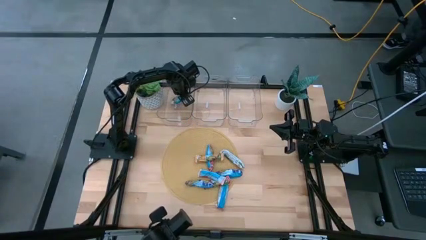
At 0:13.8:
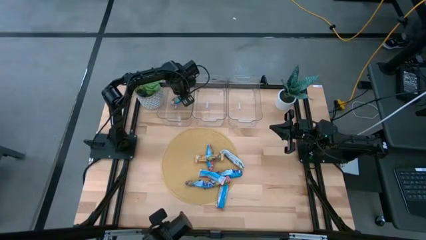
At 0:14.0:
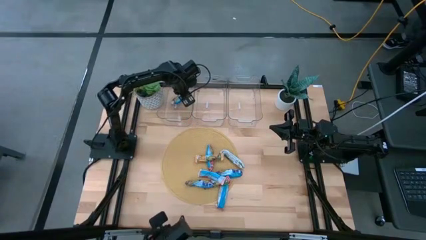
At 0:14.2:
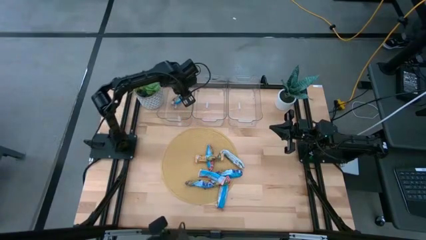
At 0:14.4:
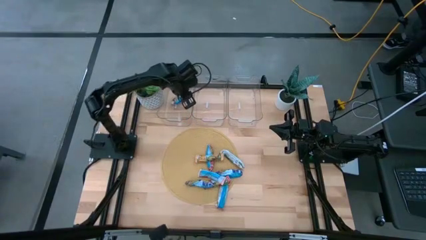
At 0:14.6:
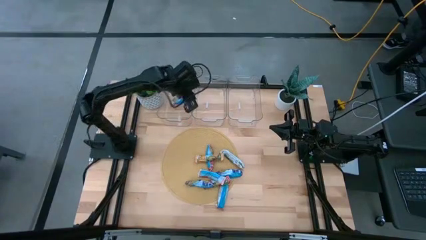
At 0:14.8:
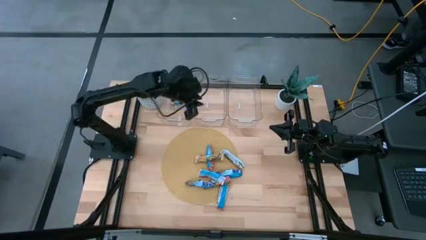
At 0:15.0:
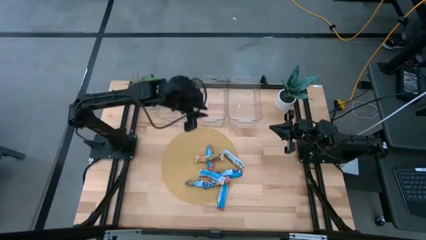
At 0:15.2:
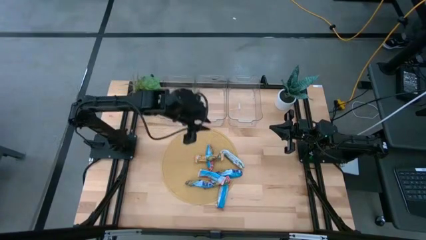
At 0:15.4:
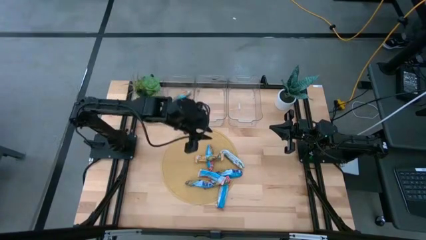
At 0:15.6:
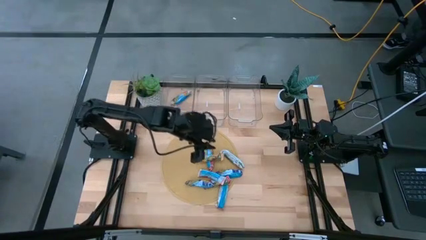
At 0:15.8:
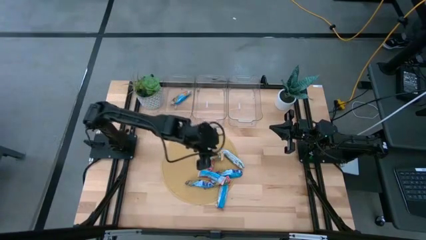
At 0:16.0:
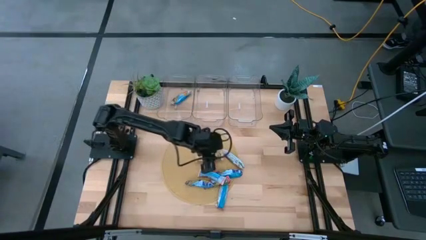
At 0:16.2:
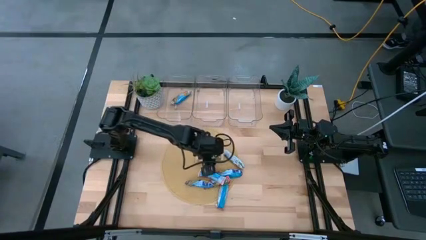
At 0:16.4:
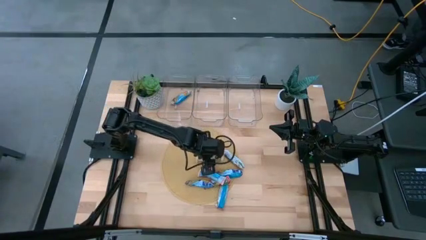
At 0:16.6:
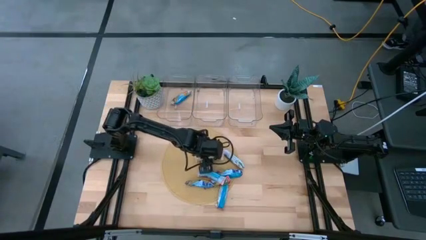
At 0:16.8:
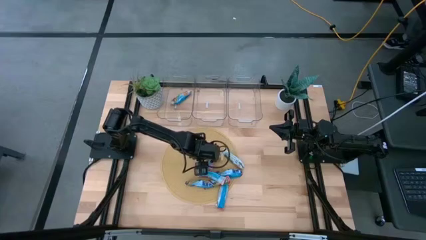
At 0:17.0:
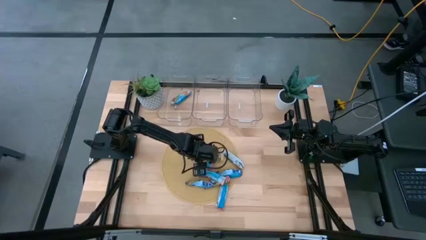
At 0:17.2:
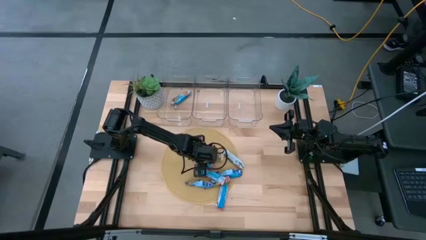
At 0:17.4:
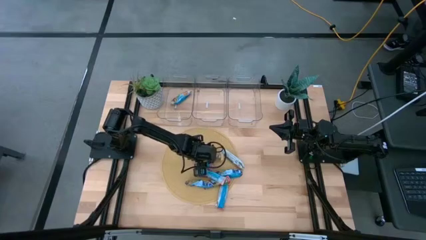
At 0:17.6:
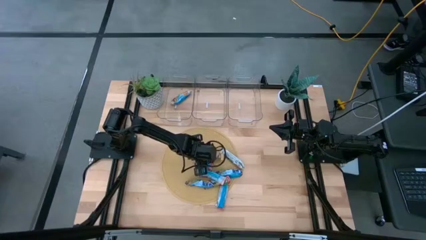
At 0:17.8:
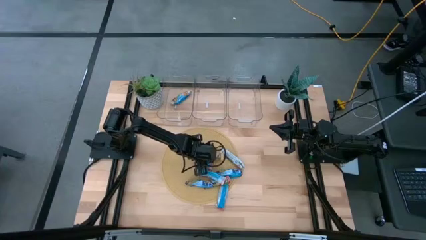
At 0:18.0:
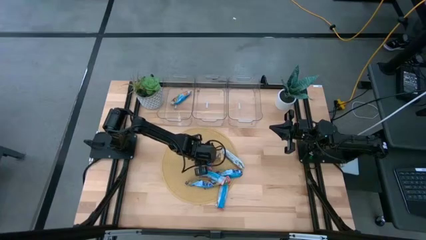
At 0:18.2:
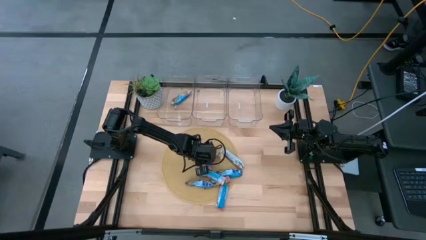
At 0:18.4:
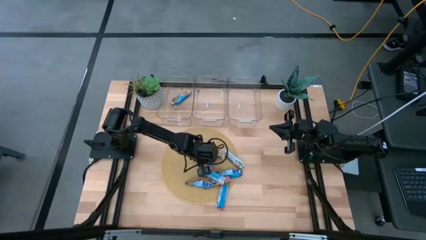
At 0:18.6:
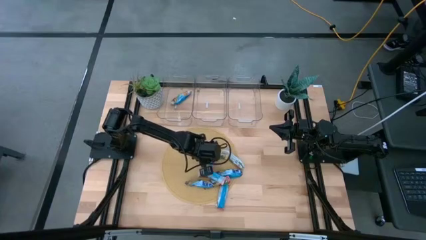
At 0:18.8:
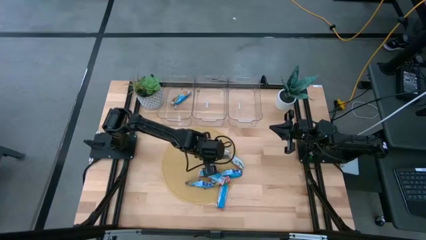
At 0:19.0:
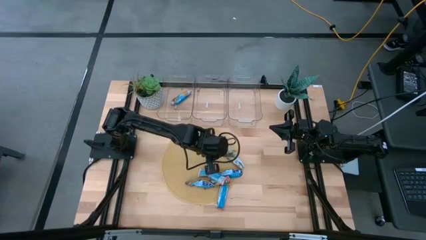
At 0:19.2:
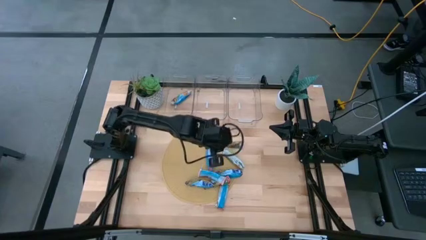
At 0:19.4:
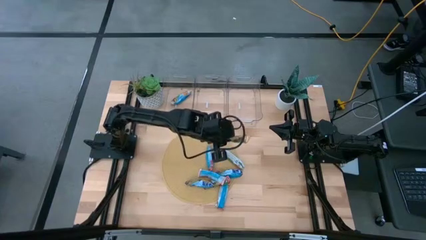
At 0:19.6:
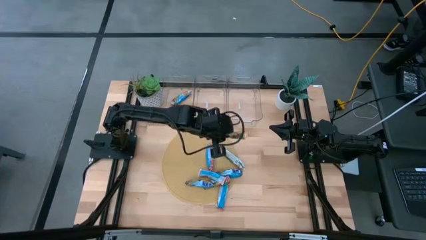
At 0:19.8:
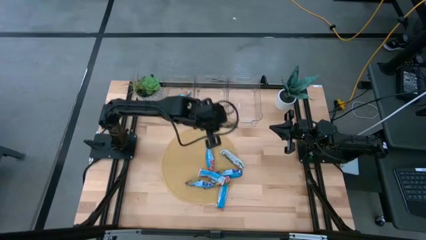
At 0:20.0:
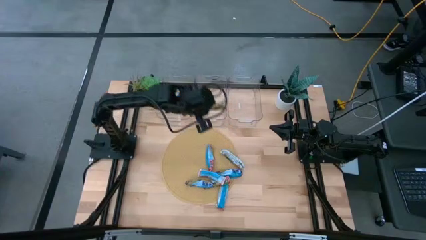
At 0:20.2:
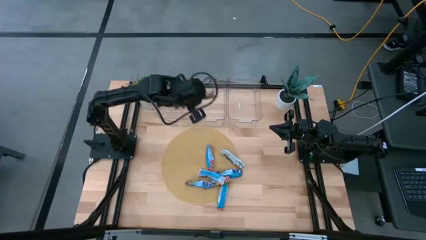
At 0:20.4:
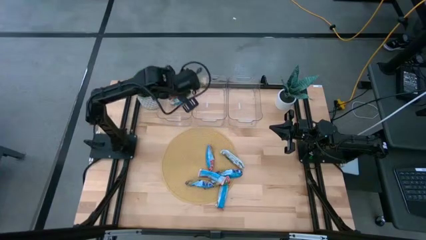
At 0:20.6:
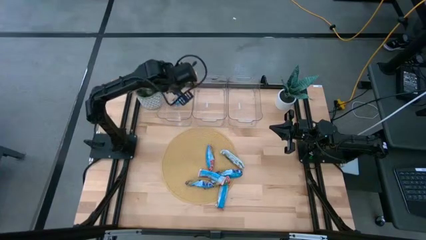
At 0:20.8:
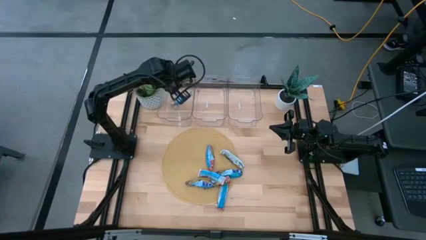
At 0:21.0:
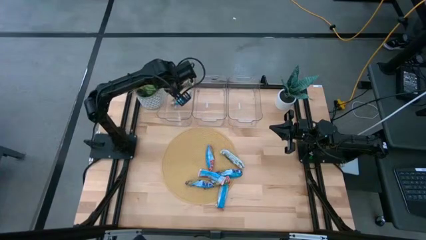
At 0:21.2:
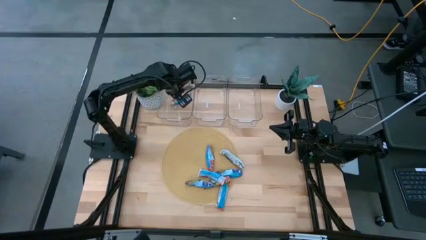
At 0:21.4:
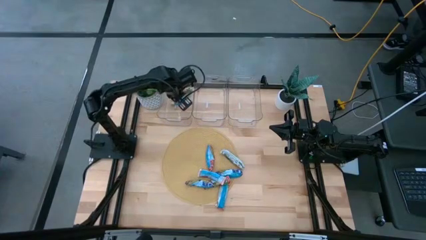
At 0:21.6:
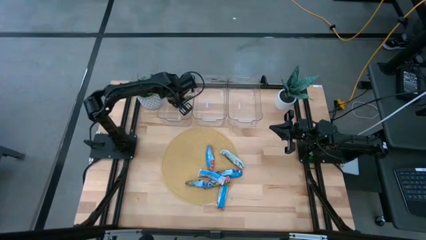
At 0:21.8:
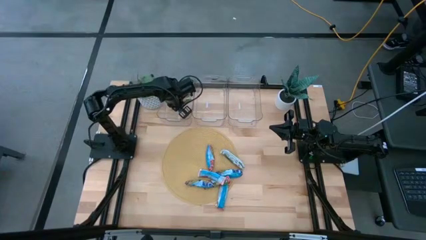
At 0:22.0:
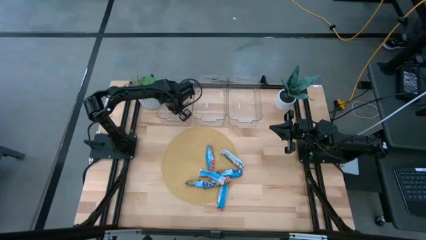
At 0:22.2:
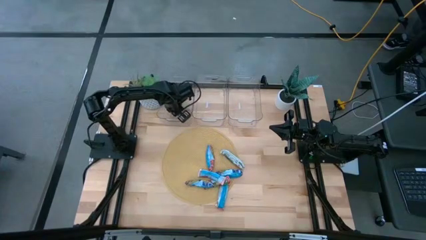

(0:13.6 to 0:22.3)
Task: Pick and place Granola Bars by type
Put the yellow granola bar into the left transparent bin

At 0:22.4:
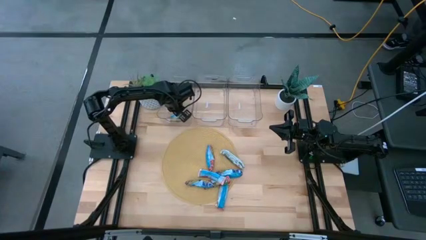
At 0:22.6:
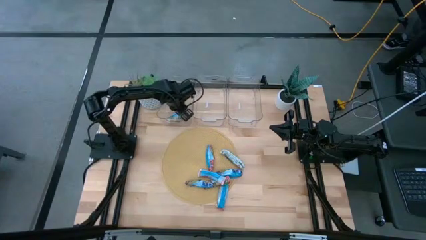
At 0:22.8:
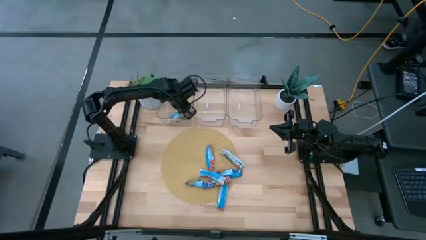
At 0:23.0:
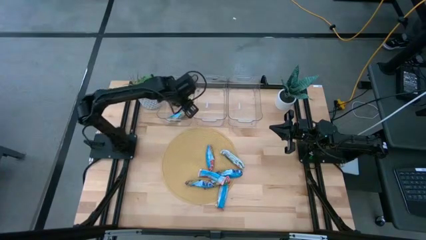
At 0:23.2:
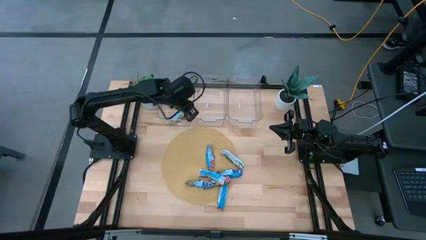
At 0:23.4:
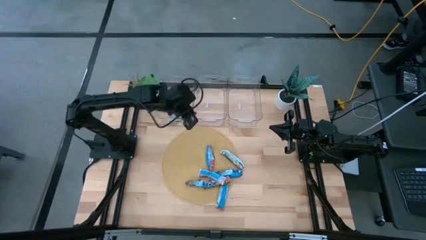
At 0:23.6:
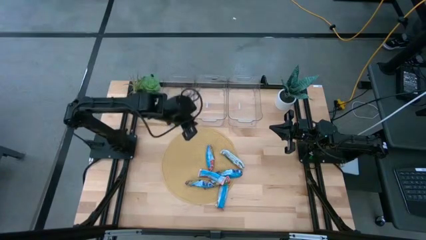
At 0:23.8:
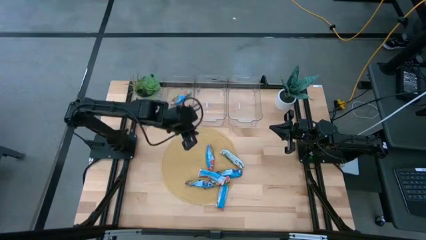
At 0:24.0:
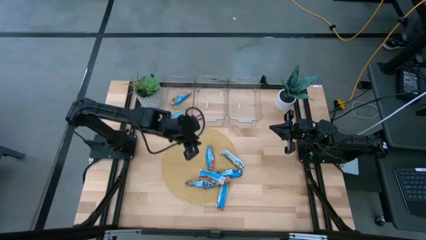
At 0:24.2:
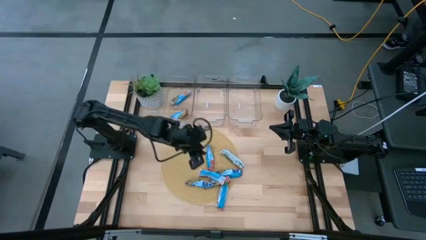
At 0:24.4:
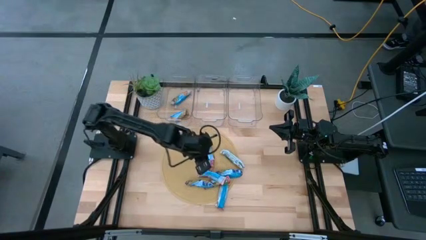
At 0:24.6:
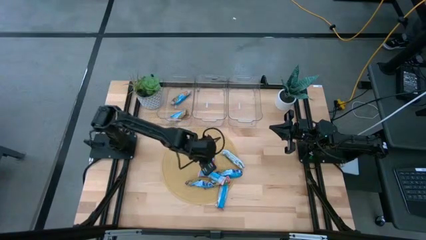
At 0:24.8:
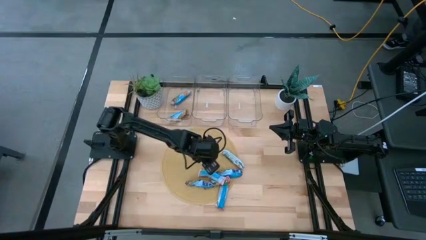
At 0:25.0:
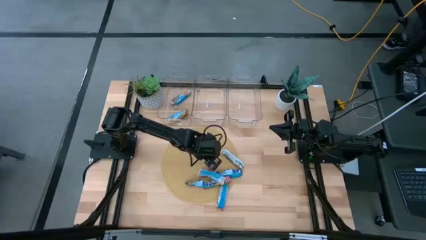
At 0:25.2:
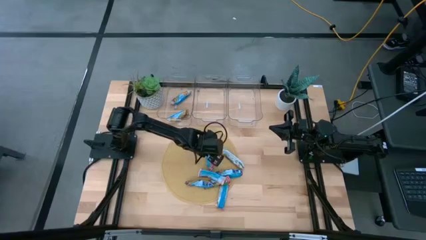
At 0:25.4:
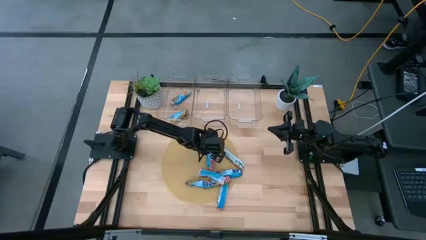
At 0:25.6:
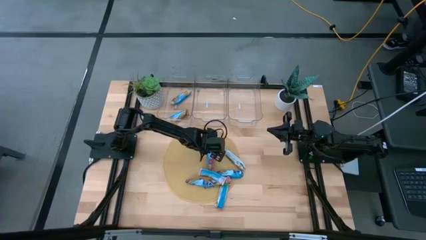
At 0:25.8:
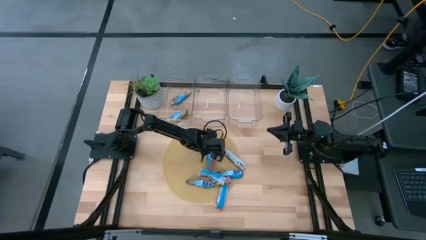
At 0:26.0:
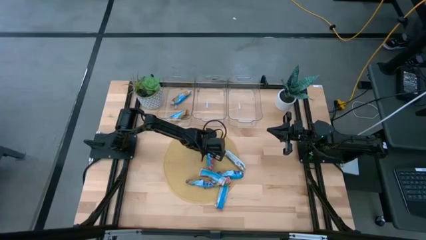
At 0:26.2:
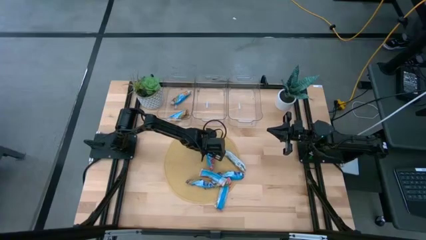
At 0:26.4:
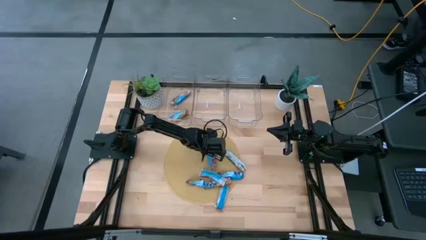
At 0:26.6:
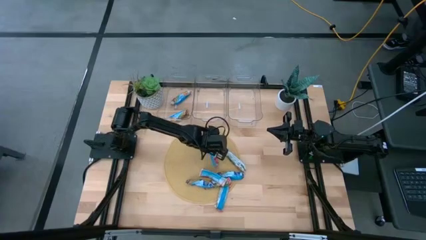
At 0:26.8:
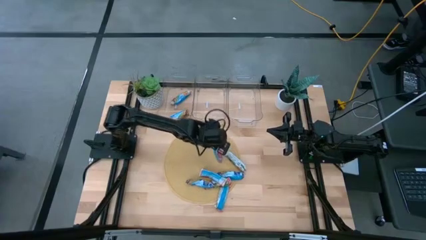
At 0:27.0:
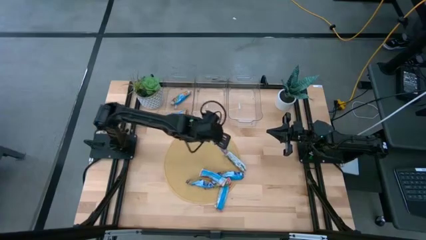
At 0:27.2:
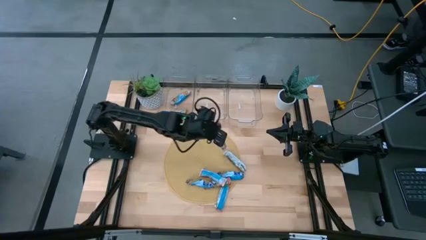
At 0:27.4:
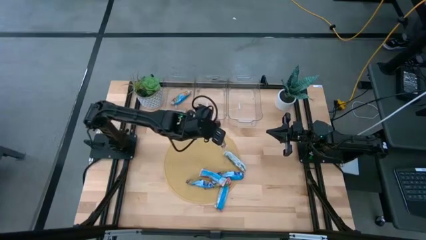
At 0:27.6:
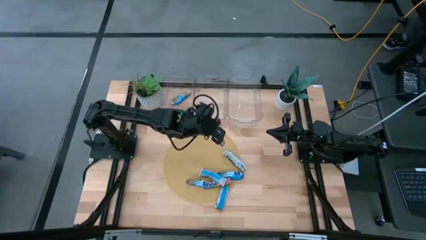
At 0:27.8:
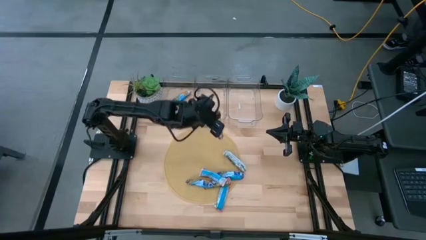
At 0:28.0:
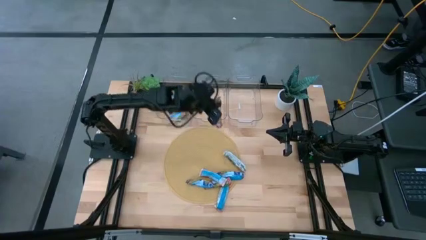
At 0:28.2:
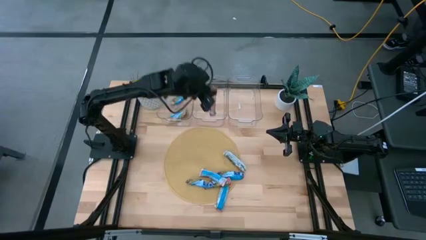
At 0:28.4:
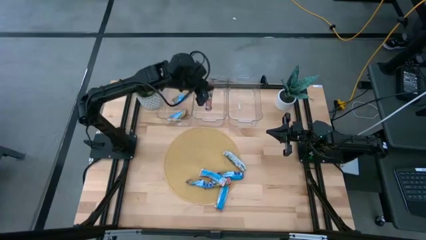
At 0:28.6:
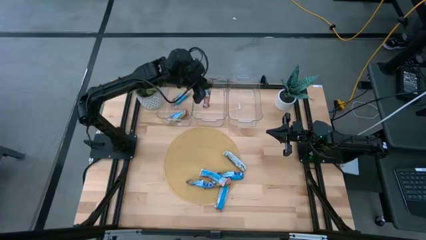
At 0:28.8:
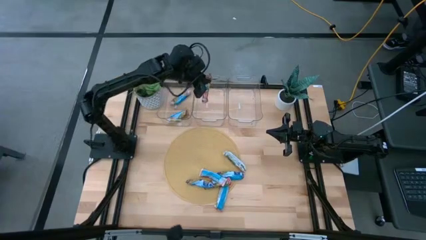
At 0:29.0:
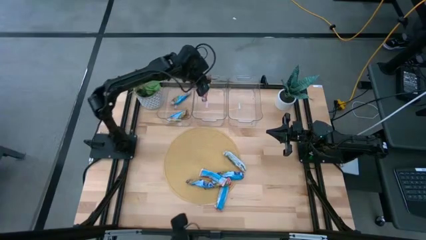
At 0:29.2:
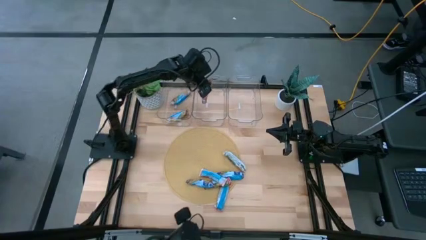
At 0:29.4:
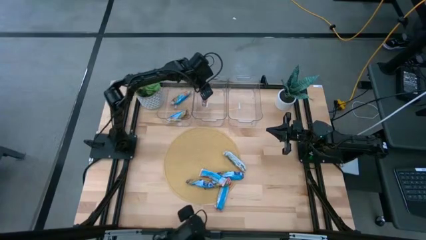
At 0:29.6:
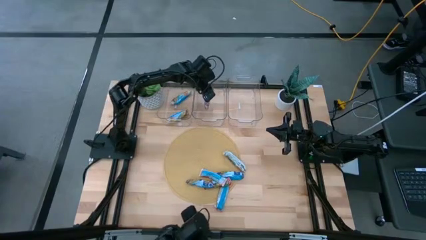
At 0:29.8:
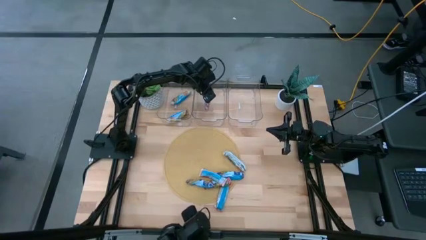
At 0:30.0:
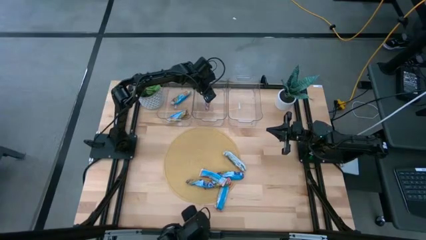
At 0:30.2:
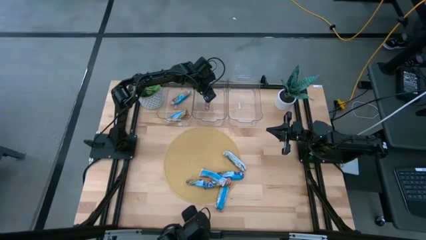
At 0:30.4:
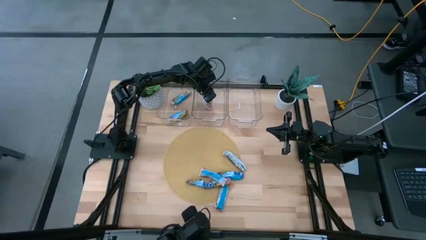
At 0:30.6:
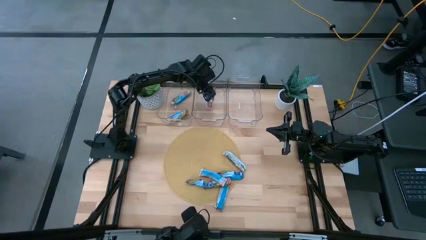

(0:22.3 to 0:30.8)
Put the red granola bar into the middle transparent bin
